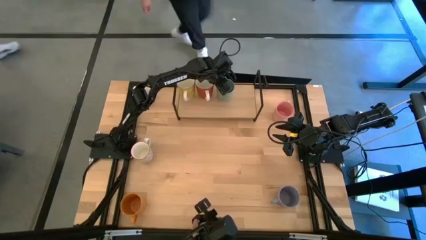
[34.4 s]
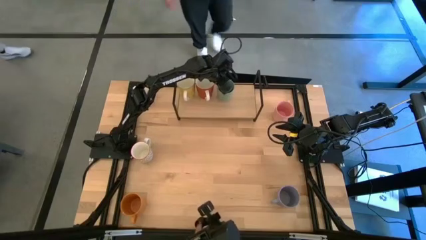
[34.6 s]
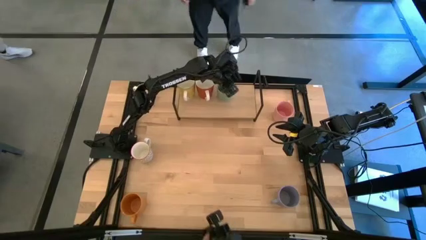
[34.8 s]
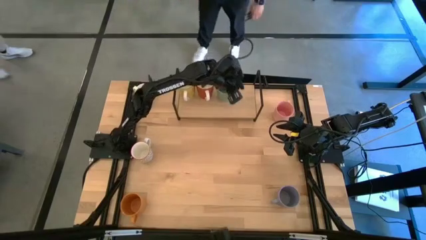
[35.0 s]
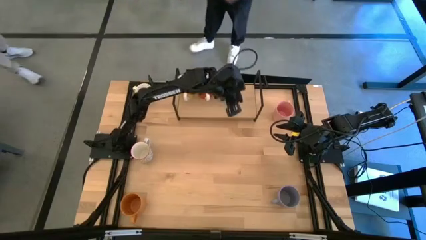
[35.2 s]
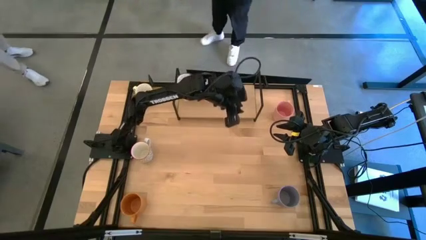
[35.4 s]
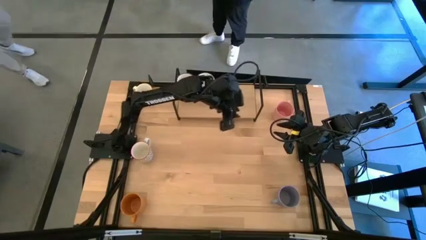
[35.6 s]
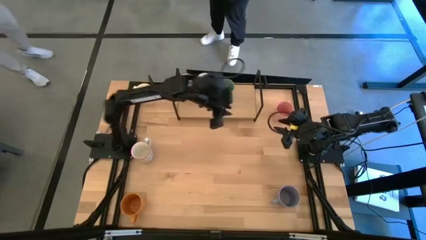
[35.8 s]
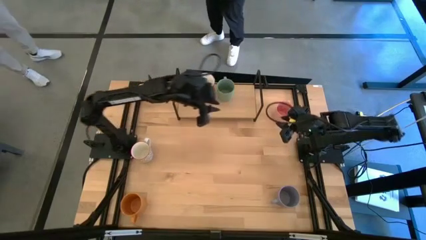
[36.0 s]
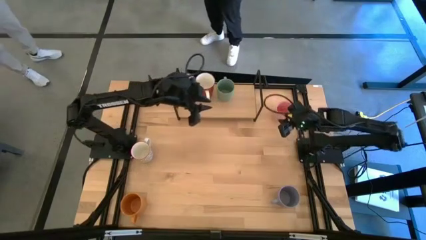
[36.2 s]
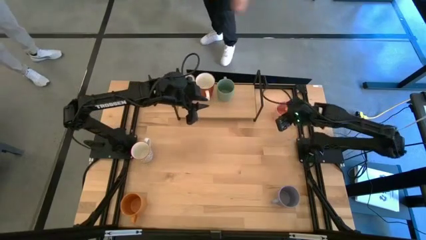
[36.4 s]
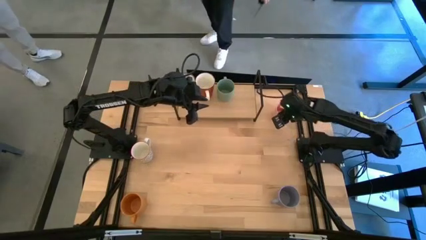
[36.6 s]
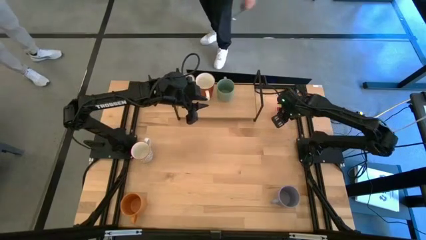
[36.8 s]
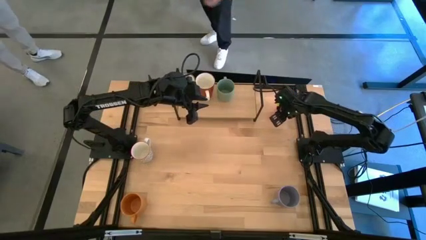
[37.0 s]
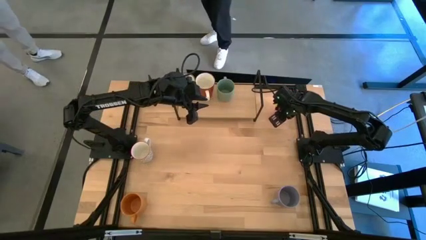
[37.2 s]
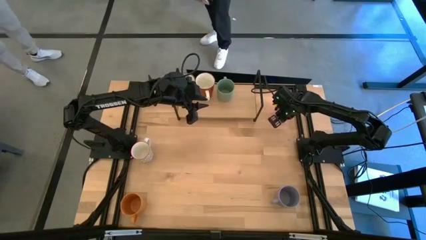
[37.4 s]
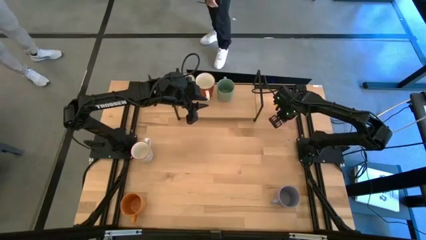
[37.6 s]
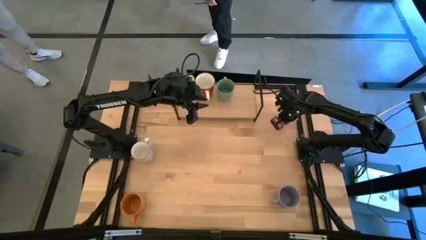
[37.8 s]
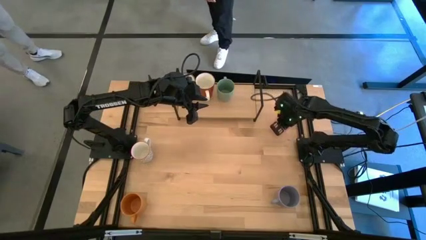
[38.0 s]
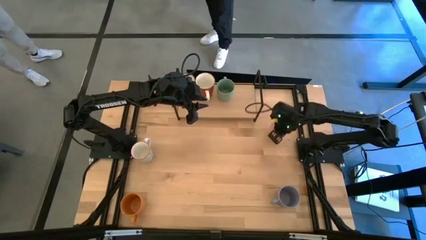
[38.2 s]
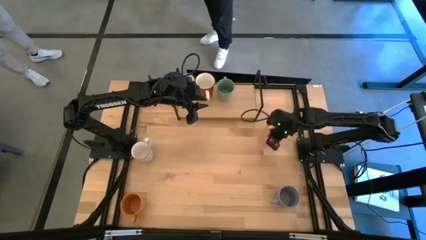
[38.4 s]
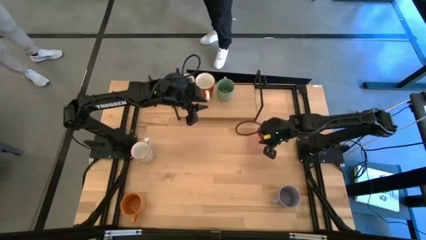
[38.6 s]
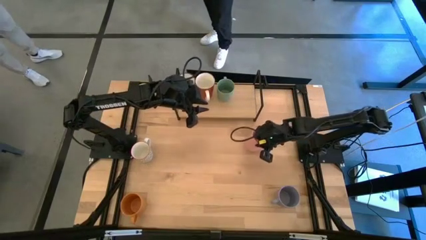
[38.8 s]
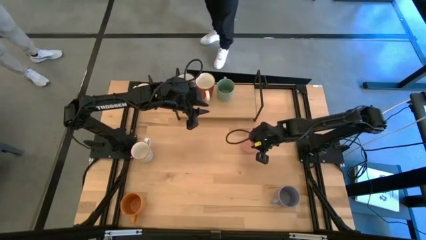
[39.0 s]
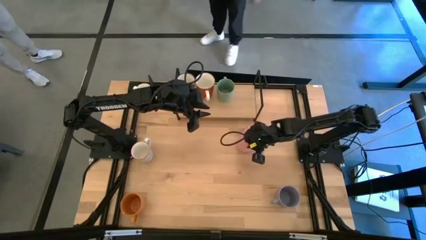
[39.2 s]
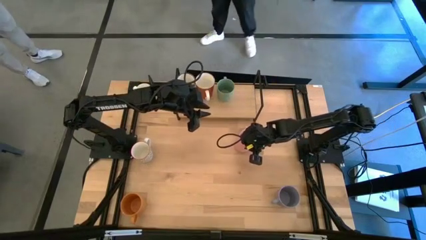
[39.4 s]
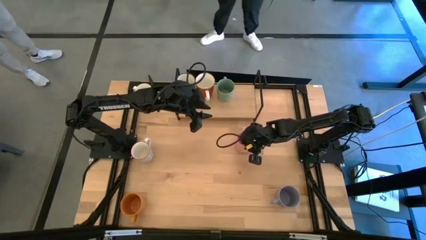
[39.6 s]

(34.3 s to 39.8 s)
Task: Place coffee mugs
Move the pink mug to the center of the table

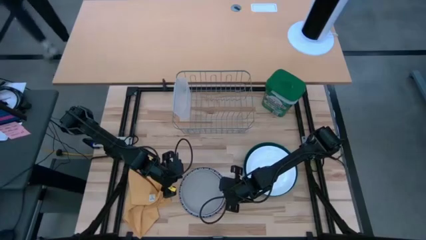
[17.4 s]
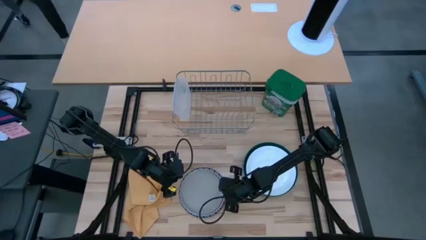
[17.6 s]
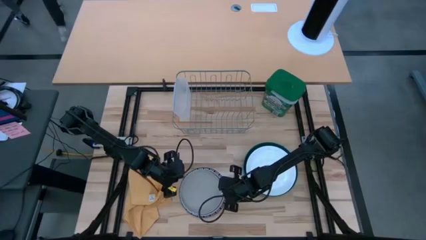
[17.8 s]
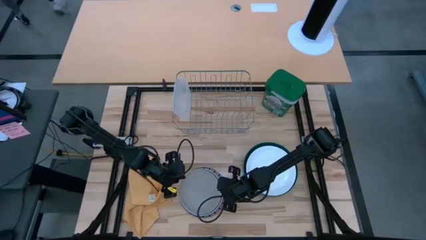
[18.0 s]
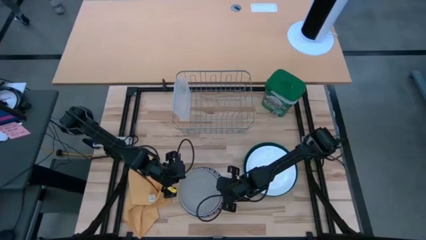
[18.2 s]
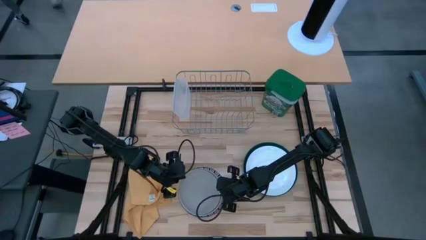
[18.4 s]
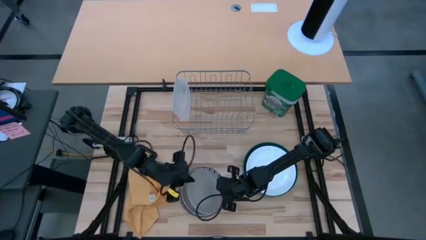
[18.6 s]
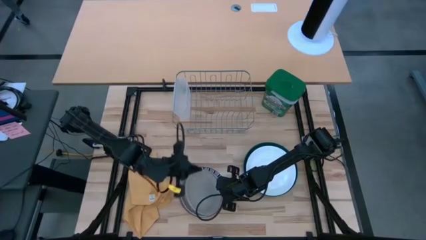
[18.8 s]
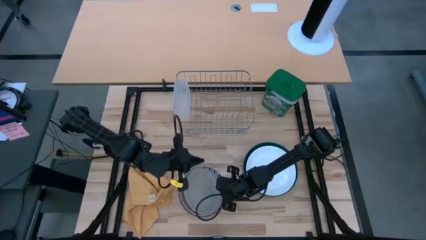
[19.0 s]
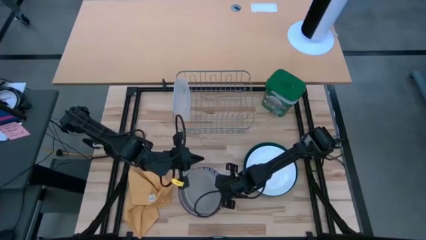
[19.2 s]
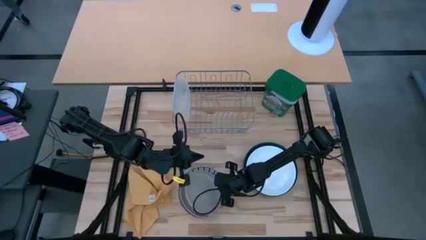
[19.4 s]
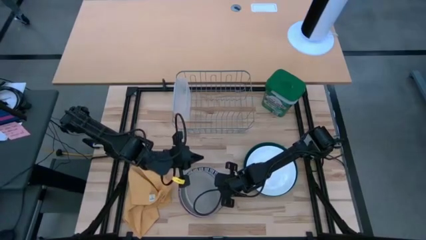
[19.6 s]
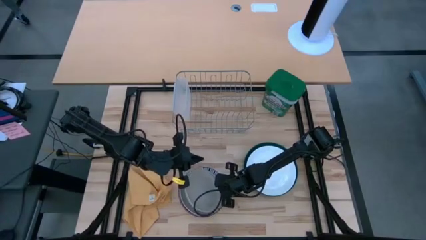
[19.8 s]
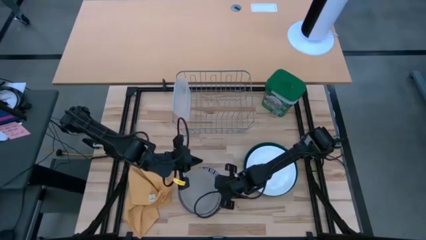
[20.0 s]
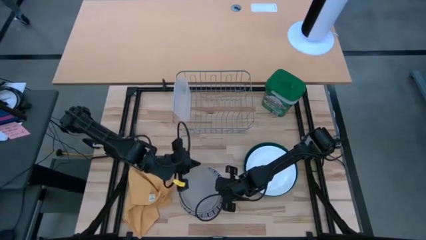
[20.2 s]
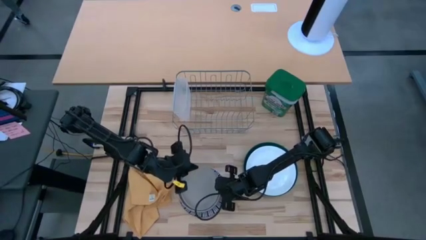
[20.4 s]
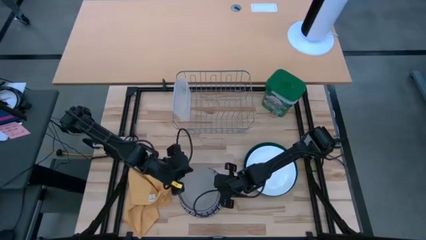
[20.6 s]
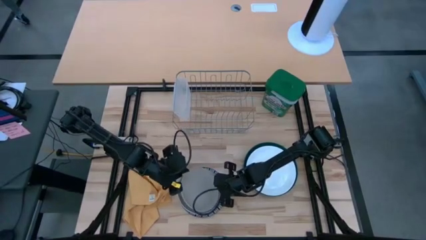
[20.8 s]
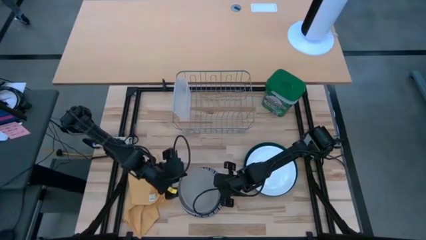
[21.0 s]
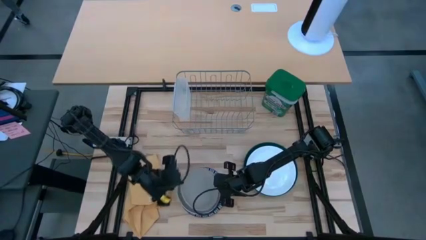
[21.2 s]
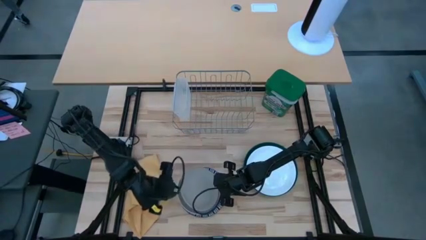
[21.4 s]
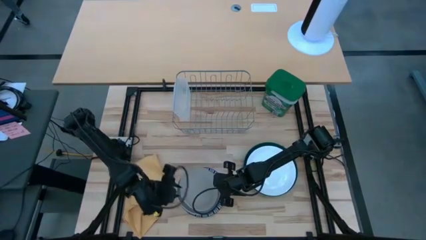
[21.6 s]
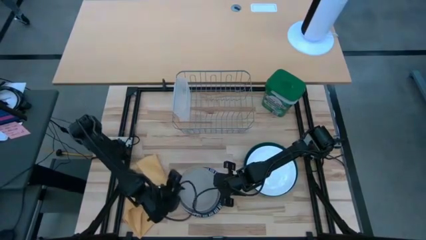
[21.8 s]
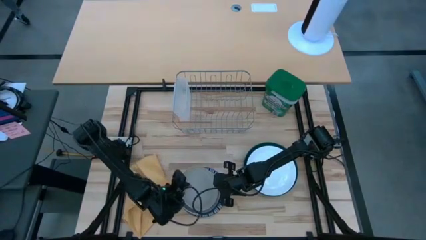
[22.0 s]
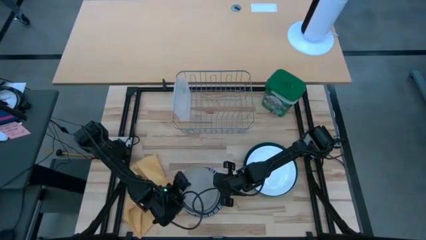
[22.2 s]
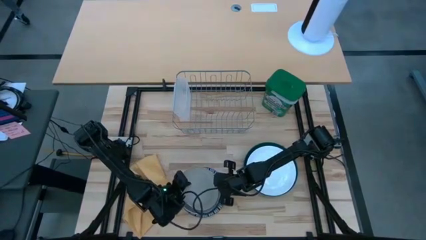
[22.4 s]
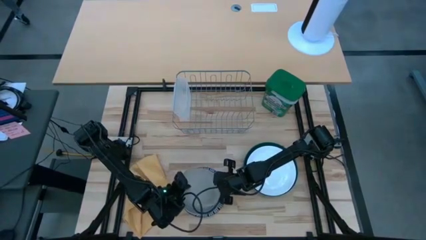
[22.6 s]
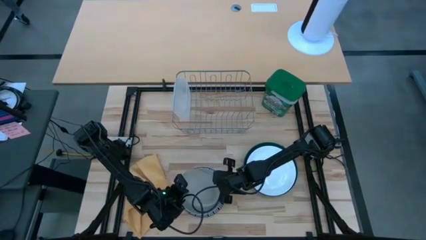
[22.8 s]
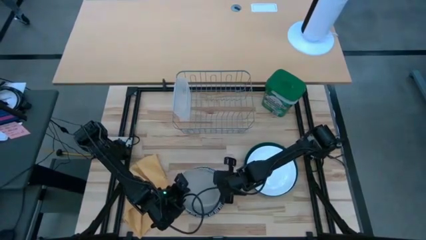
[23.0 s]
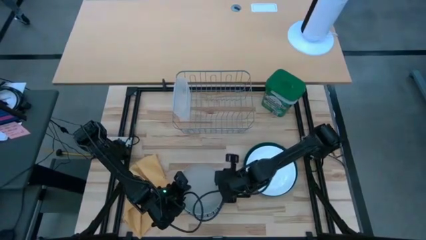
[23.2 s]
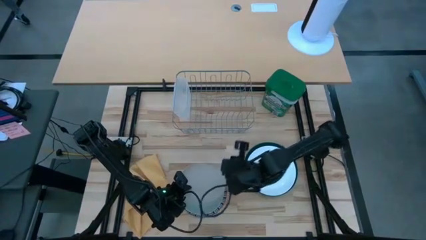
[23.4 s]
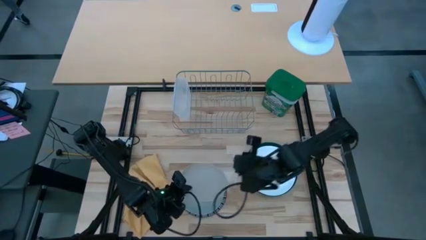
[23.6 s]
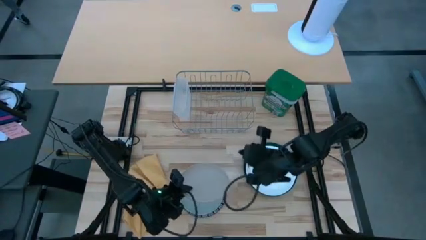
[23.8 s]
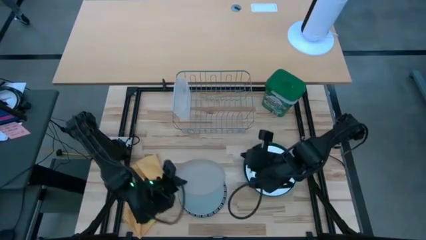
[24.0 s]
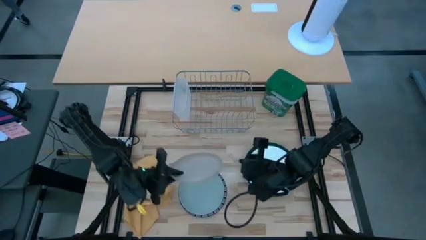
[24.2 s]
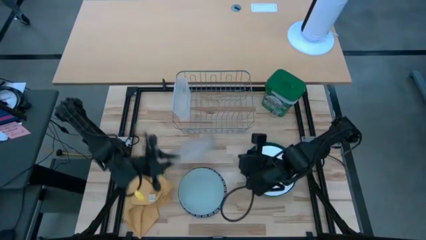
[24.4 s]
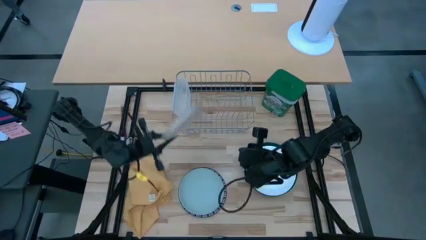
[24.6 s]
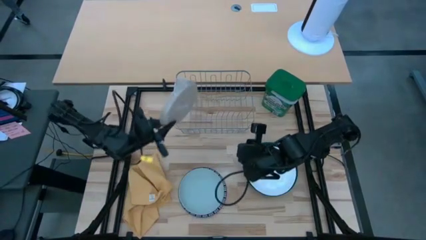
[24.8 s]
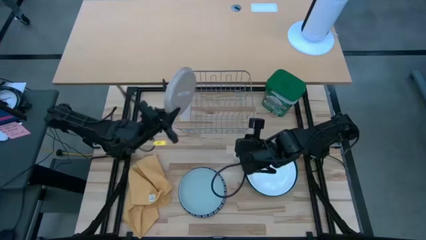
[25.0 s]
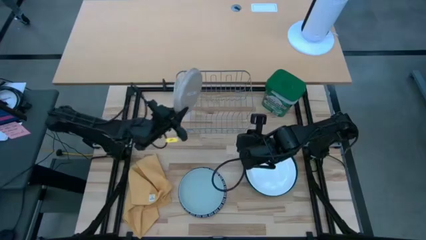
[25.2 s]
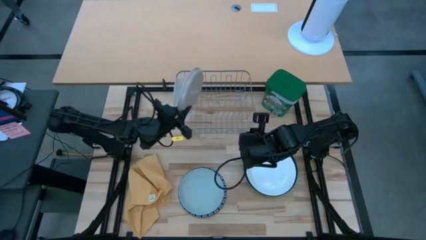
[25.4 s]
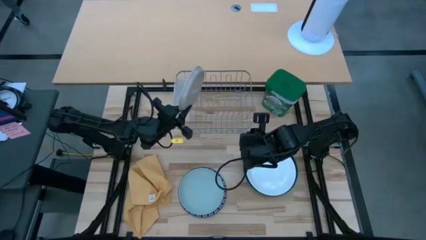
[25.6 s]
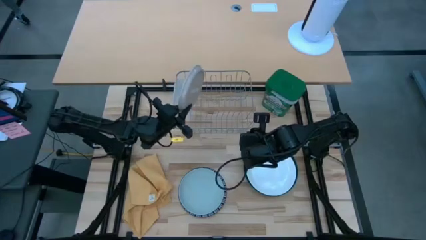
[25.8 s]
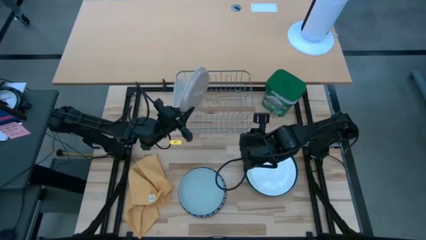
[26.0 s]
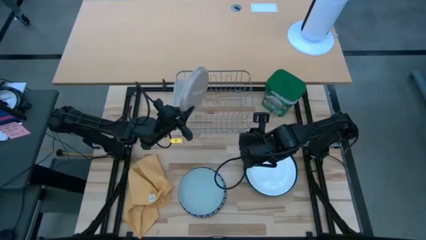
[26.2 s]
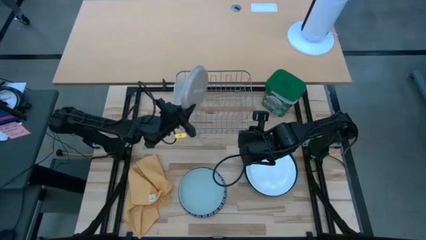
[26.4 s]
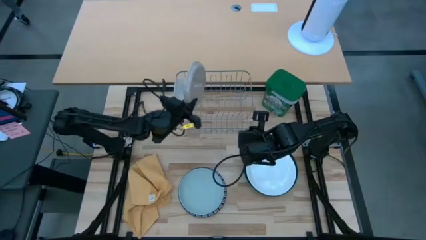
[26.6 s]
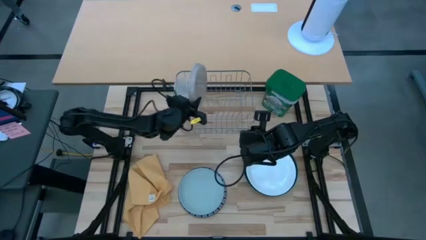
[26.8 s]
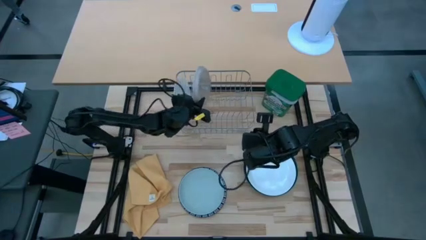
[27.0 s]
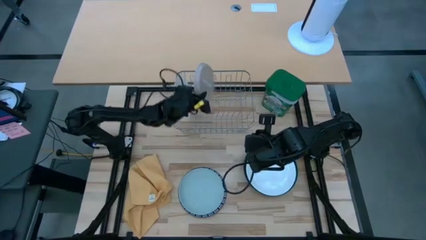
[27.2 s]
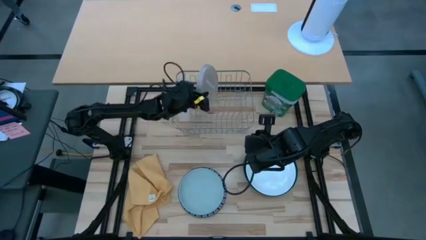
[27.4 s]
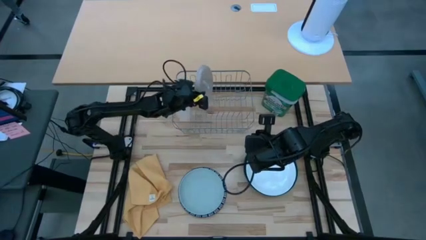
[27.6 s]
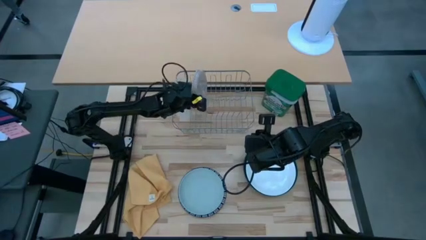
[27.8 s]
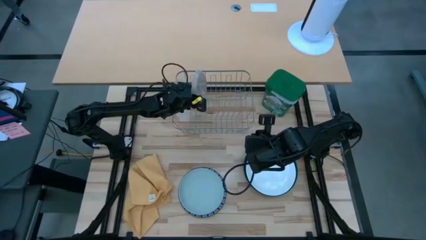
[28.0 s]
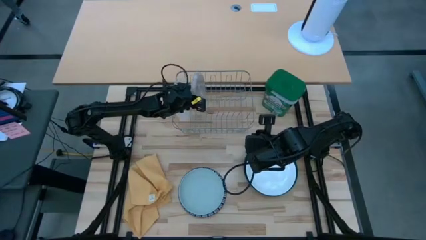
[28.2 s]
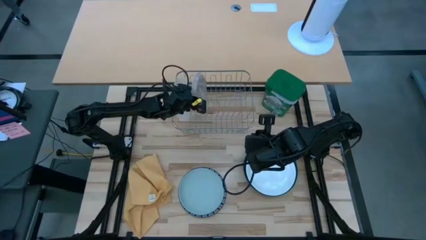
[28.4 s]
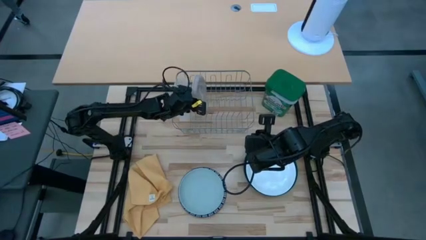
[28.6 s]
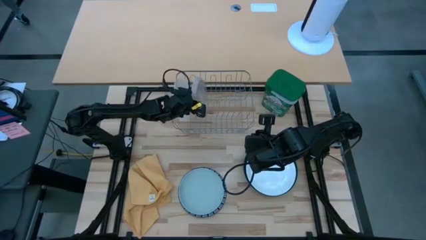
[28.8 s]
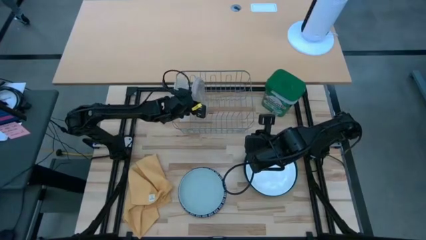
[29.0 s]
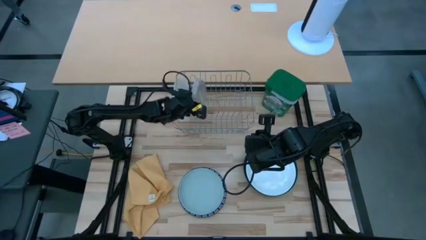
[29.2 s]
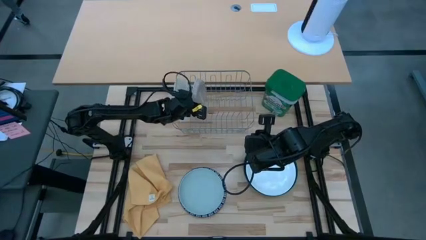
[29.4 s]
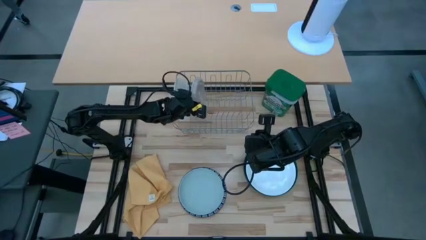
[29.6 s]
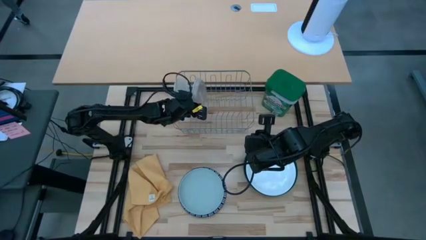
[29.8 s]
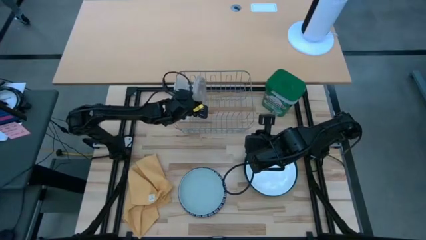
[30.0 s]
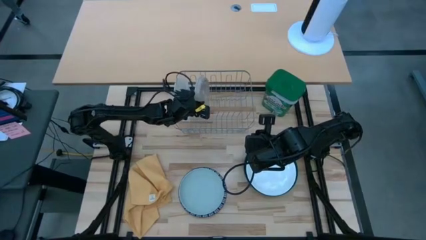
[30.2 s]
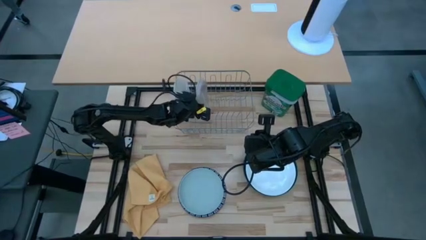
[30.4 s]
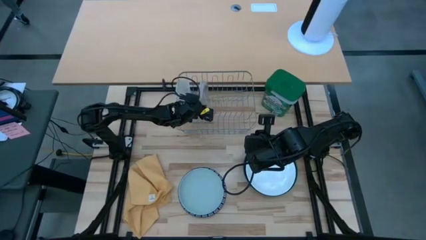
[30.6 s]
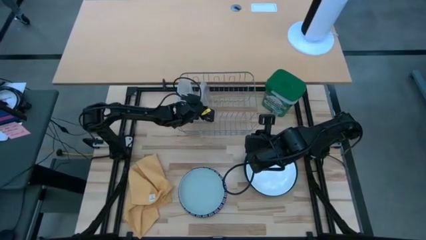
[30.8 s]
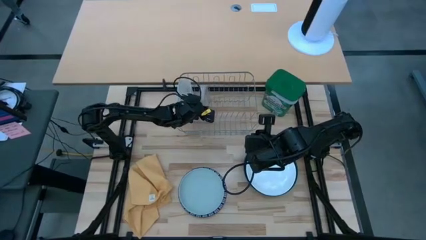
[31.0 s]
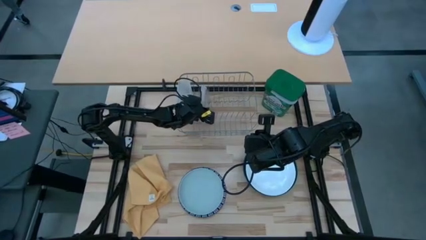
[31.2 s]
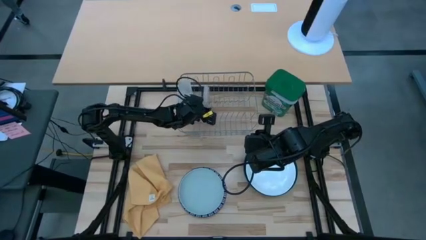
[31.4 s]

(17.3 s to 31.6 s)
Task: Sort dishes
Put the gray plate into the dish rack
